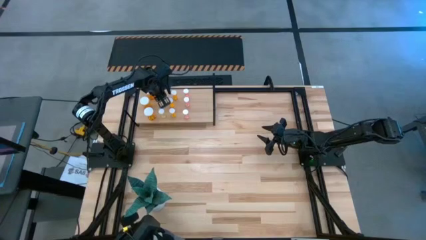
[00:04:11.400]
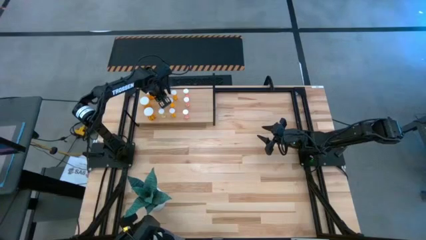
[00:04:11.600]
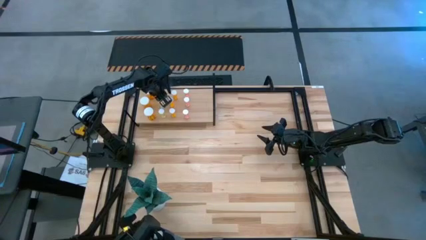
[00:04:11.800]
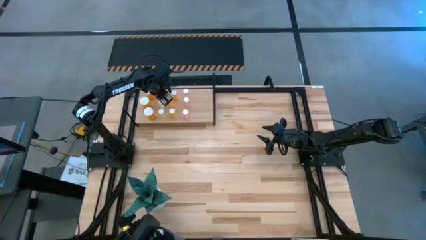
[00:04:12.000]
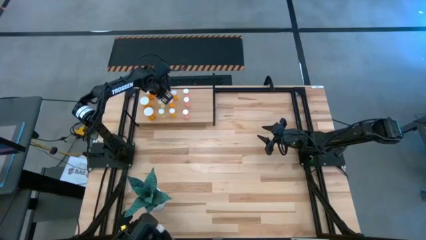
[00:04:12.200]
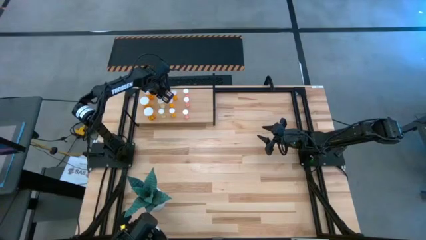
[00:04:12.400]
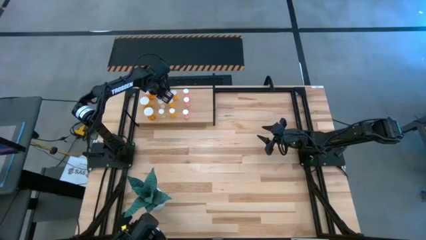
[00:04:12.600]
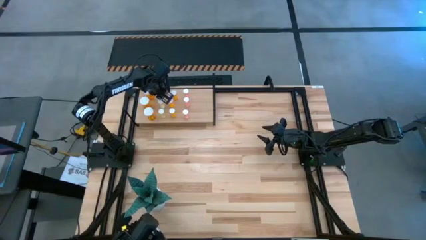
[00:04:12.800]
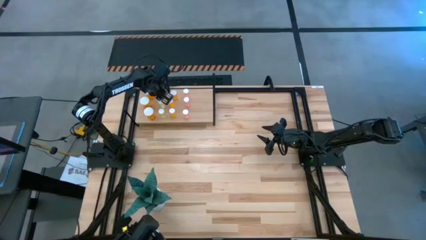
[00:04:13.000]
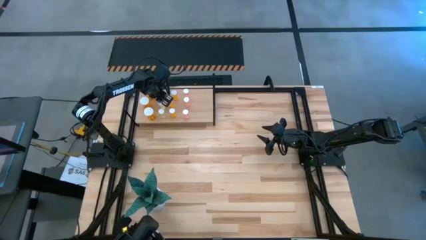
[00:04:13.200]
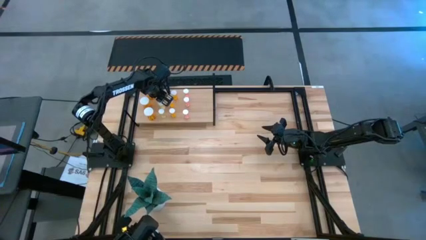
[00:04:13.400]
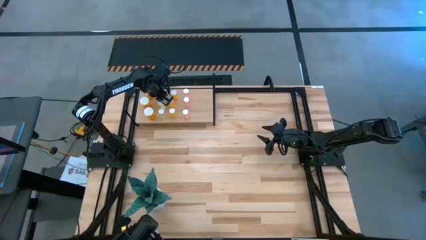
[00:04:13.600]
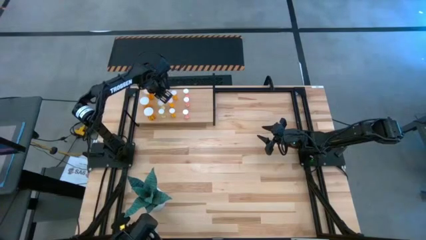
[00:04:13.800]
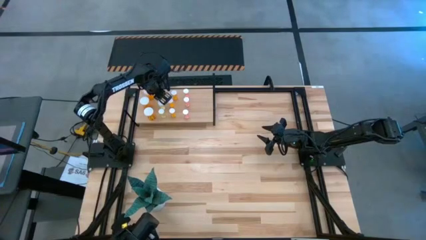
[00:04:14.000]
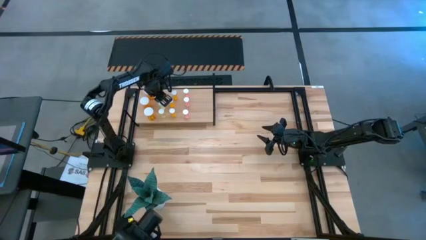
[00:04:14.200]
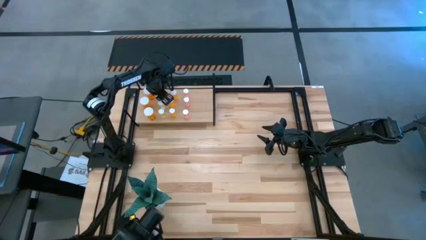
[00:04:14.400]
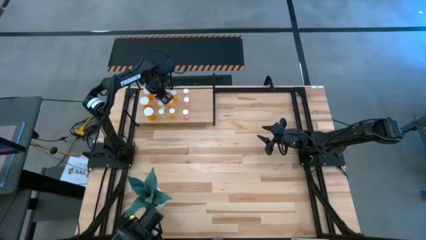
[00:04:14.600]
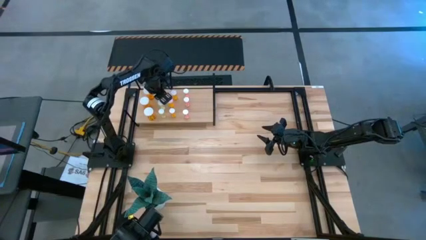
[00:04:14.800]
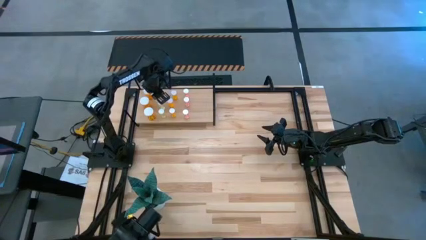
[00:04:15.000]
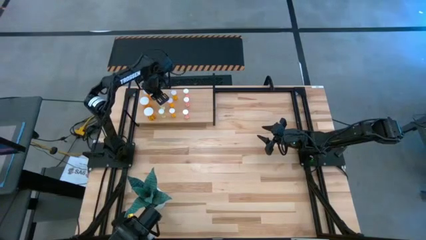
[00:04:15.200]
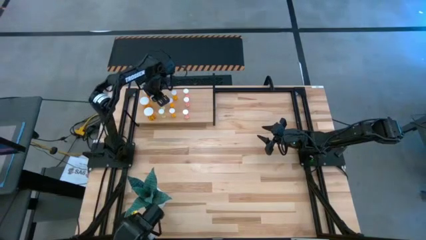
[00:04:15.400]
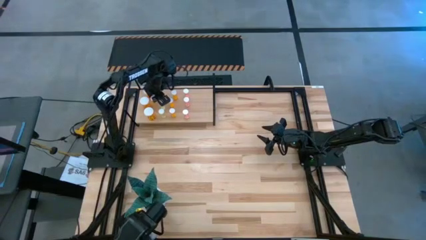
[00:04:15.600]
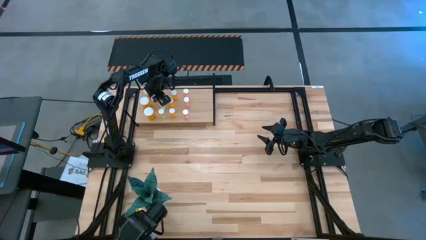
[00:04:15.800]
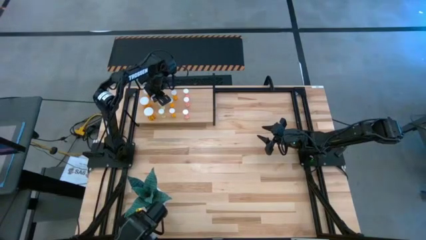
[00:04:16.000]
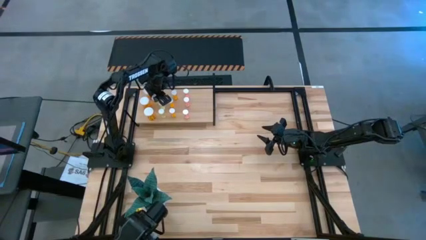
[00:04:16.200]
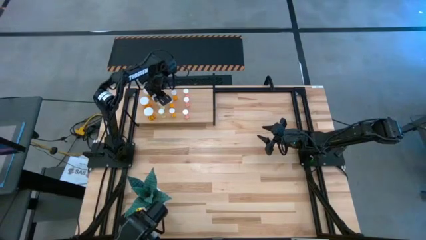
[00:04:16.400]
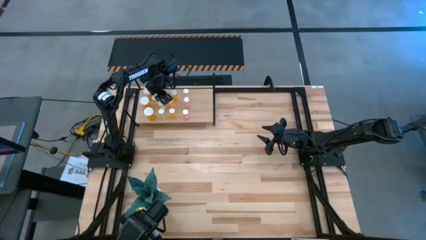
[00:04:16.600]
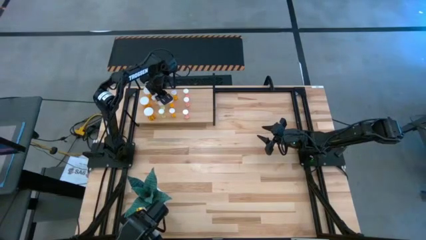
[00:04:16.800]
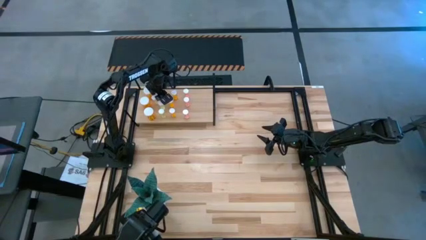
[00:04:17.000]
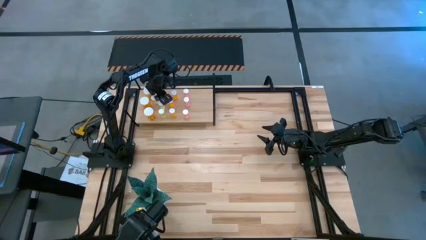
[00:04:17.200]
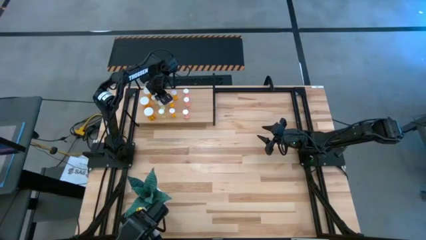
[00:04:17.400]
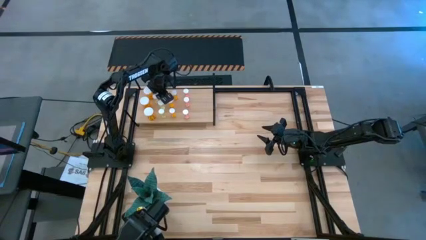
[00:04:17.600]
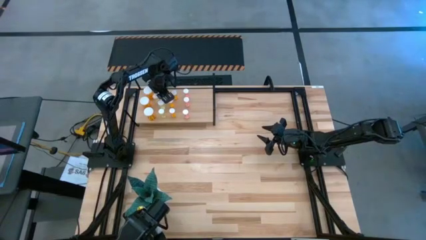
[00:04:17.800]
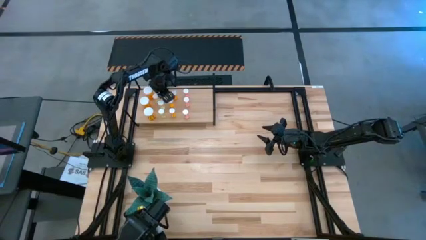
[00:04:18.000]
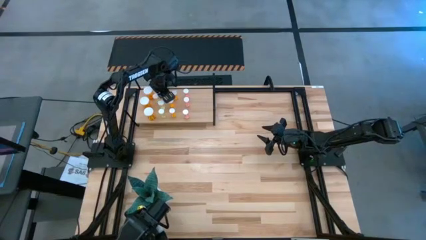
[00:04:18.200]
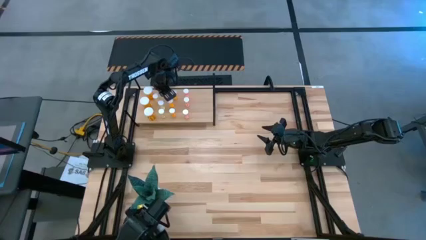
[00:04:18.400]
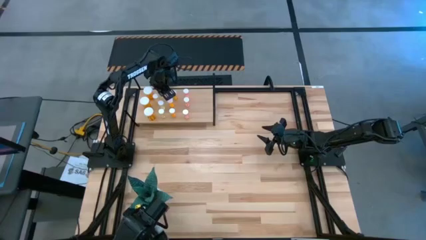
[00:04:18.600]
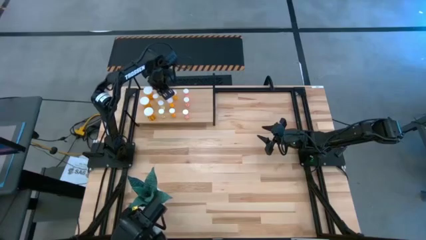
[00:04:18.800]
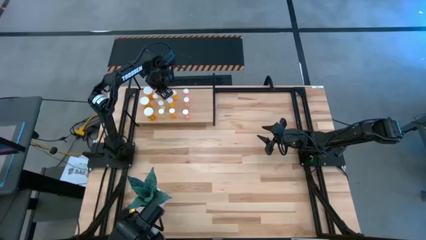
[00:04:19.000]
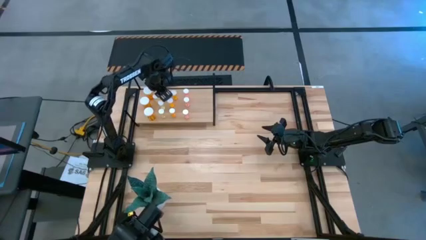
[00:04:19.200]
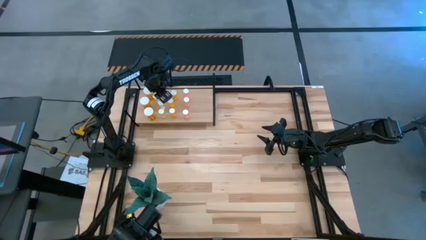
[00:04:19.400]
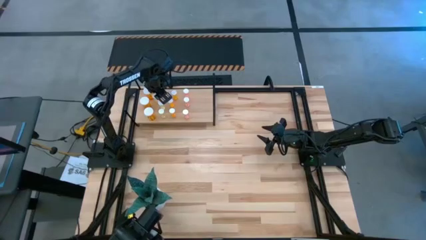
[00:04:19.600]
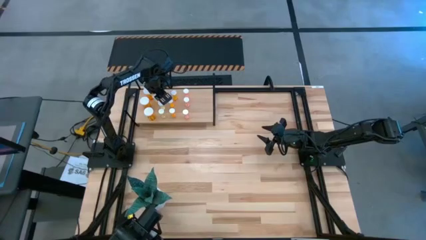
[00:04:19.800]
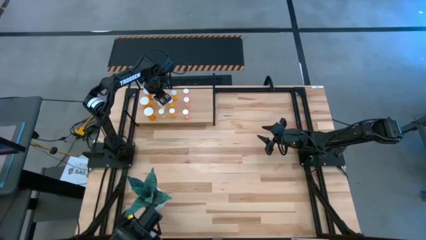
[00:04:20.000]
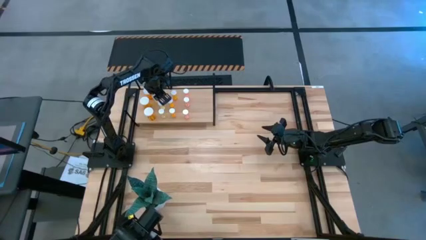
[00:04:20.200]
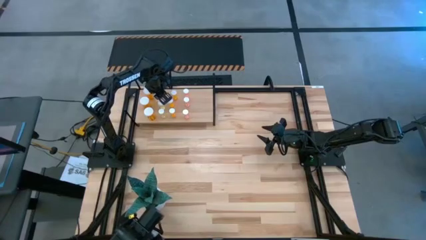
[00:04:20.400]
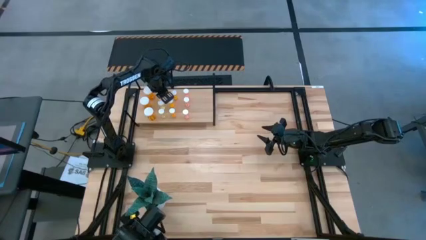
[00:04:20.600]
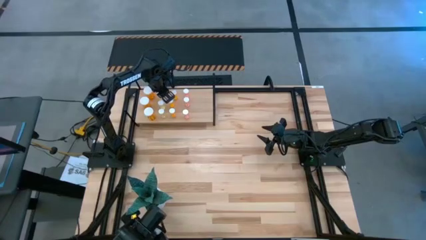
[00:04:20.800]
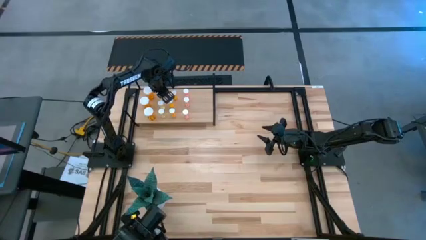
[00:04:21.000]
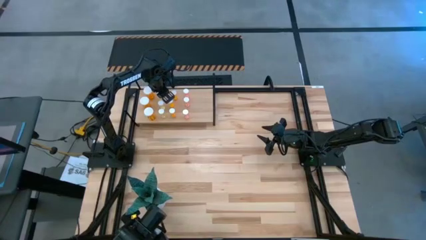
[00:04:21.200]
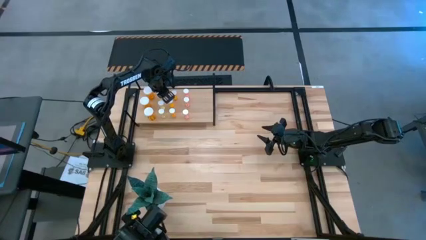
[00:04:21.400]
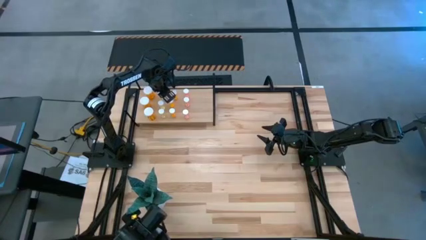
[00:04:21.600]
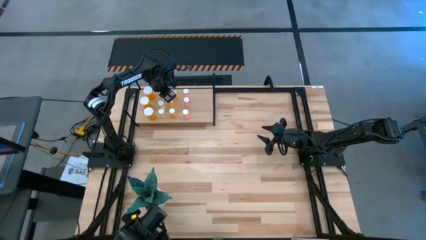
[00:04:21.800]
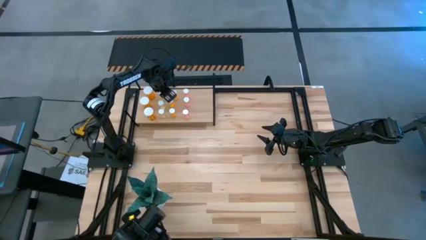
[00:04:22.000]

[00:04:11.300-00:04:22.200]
Task: Pick and place medicine bottles onto shelf by color
Adjust the yellow pill bottle on the shelf
